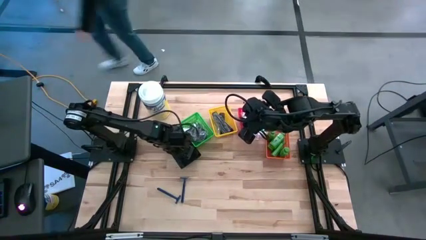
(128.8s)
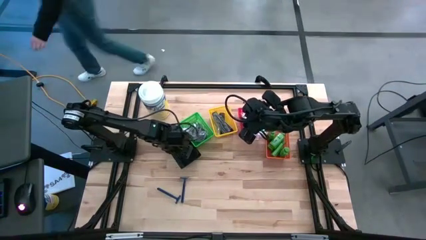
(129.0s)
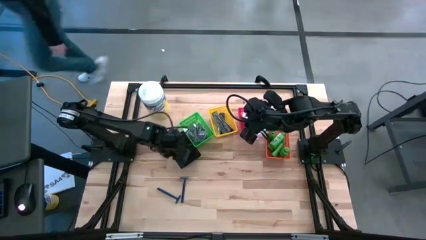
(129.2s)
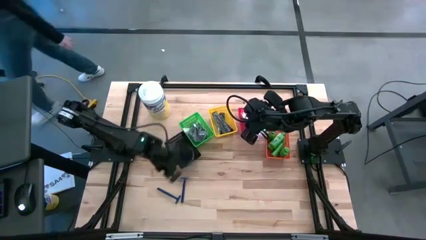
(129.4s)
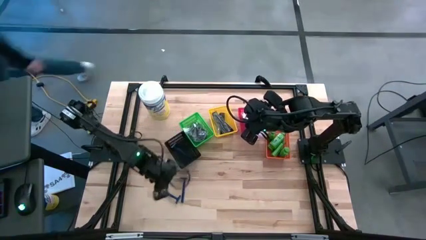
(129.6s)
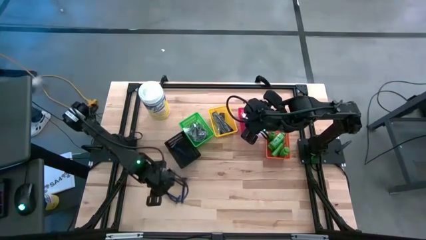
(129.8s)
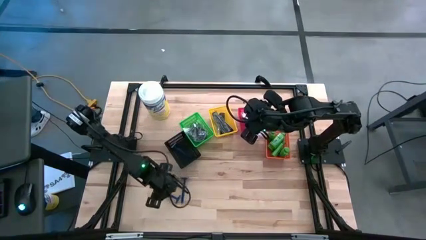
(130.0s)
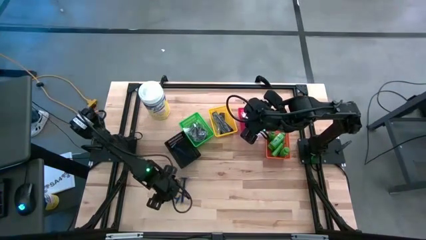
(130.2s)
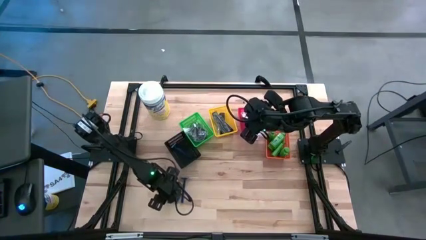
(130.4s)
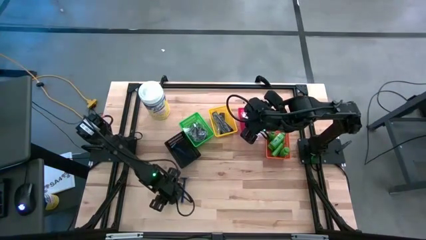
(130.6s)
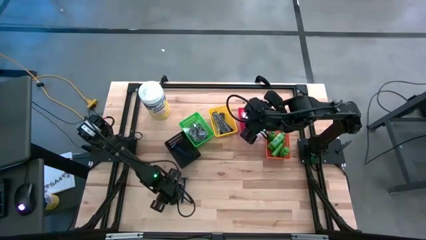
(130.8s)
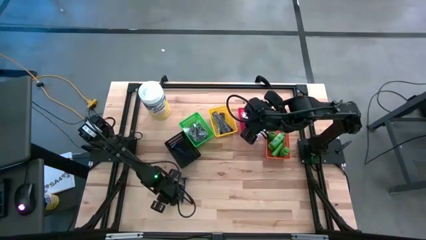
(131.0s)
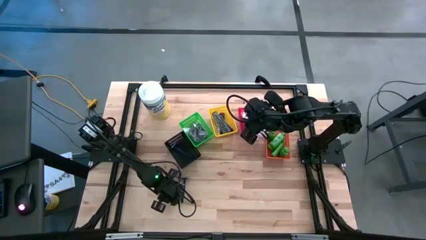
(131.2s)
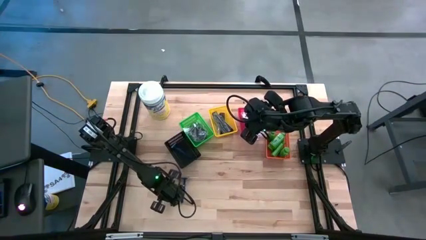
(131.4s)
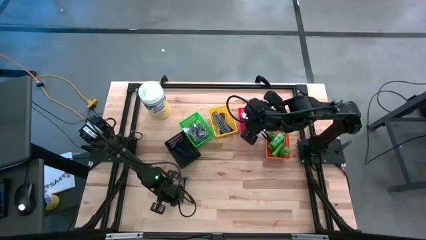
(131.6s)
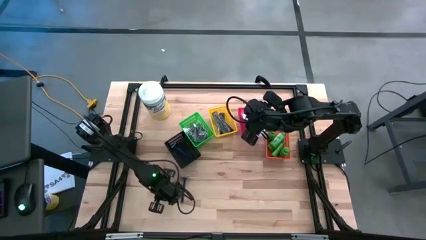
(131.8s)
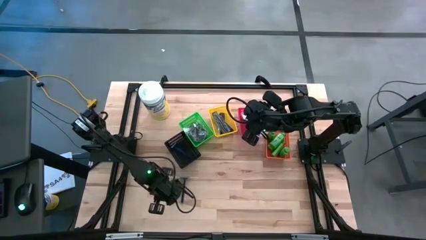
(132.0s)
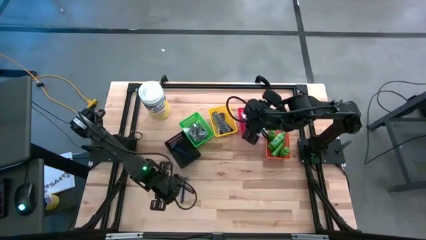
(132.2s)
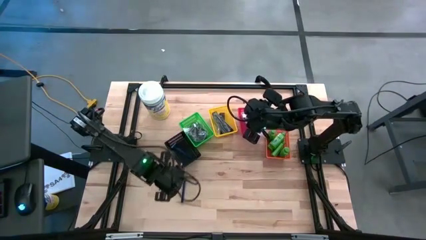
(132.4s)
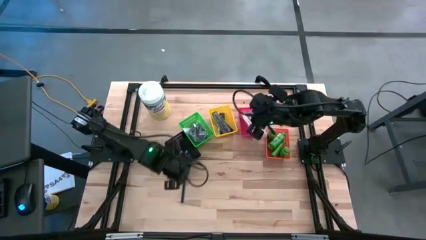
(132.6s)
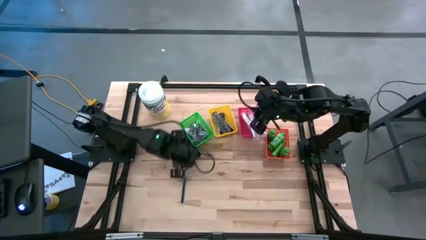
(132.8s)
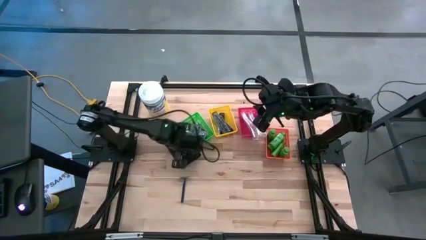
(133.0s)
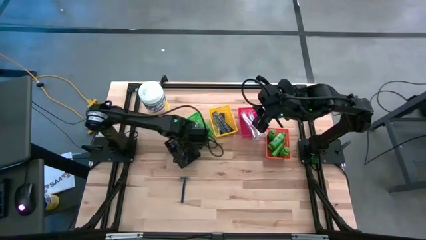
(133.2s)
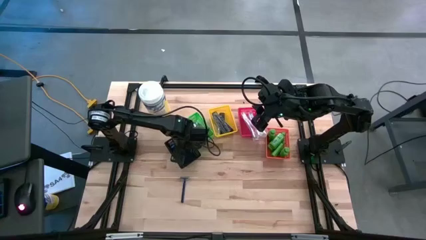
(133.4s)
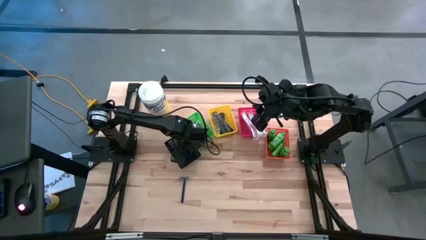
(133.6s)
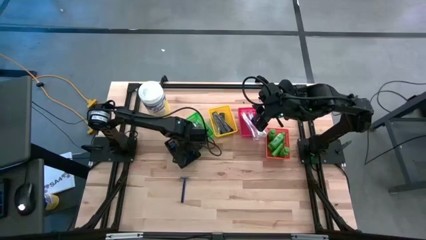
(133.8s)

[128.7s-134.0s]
Task: Pick & Place Travel size toiletries
Put the blue razor into the black bin

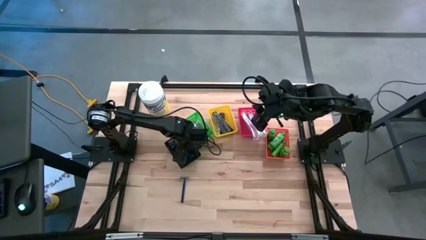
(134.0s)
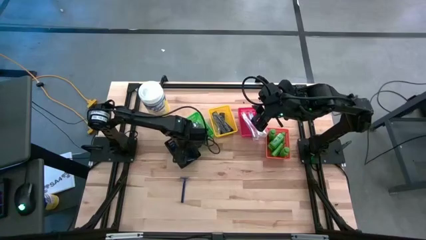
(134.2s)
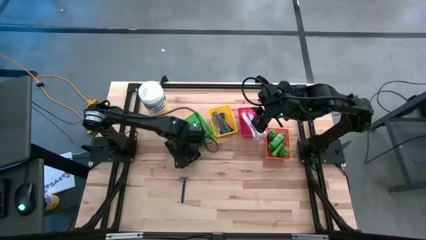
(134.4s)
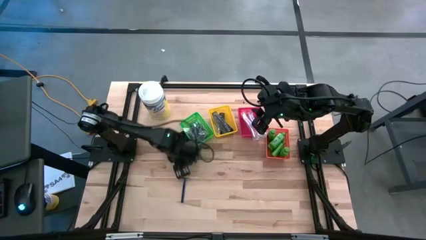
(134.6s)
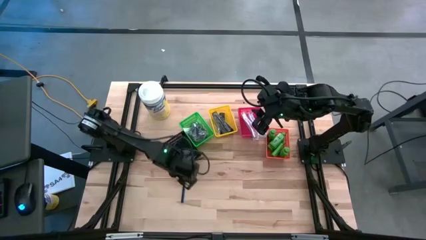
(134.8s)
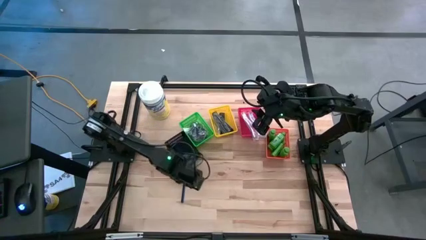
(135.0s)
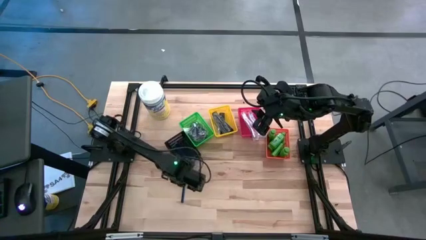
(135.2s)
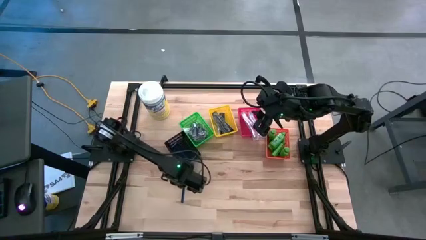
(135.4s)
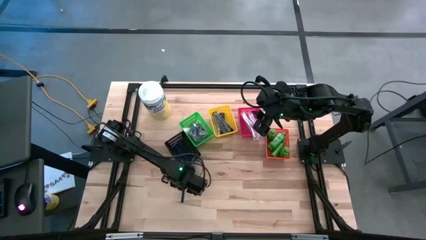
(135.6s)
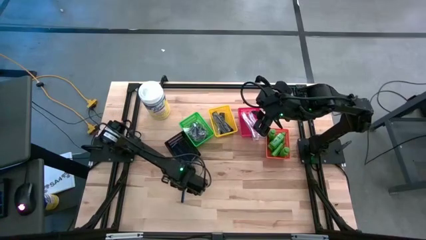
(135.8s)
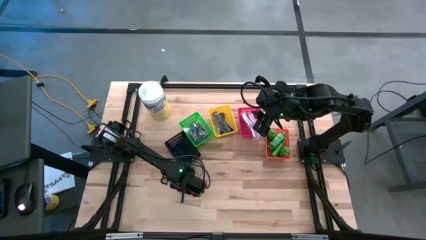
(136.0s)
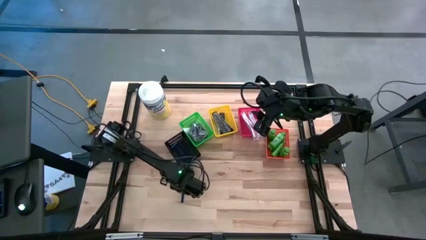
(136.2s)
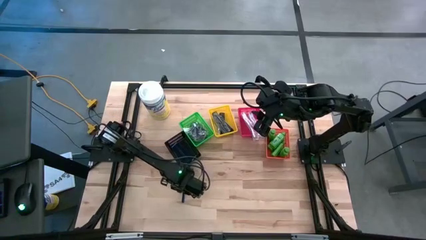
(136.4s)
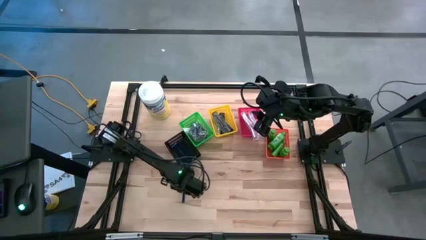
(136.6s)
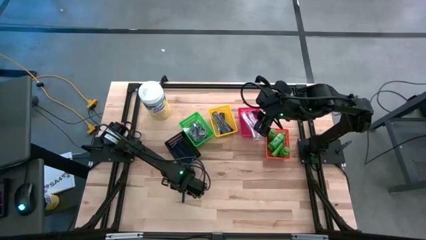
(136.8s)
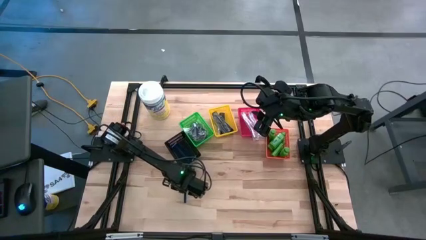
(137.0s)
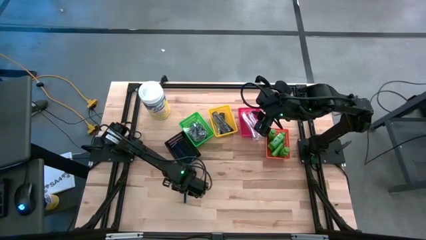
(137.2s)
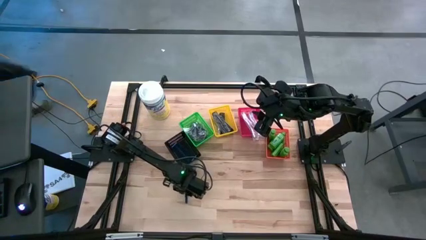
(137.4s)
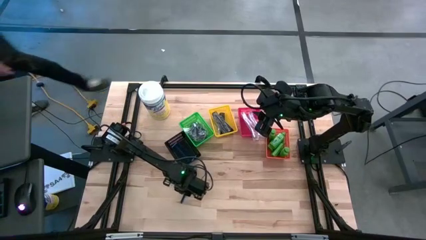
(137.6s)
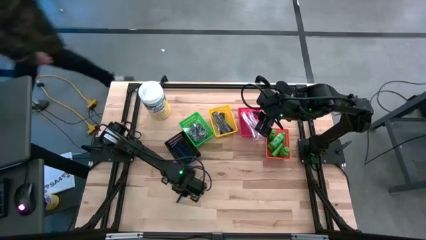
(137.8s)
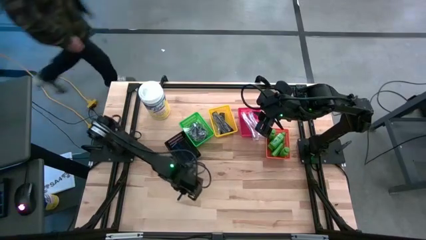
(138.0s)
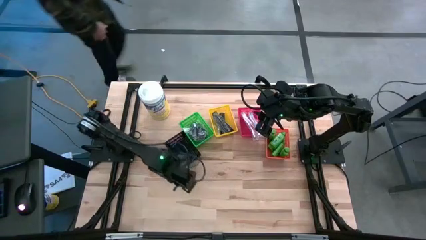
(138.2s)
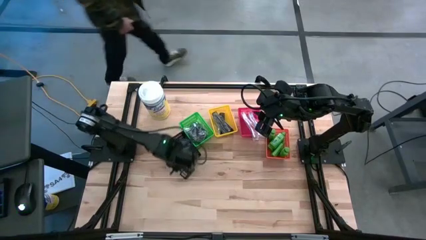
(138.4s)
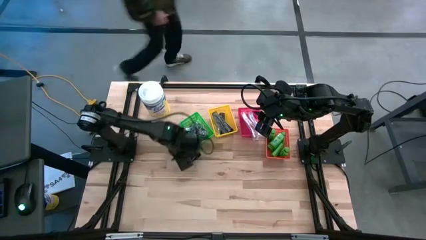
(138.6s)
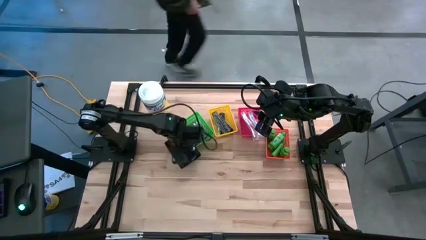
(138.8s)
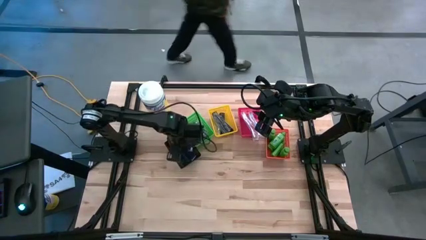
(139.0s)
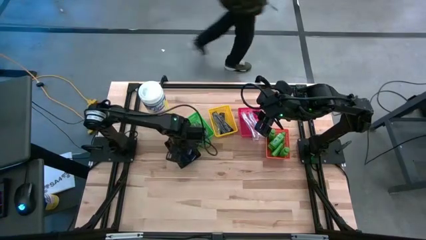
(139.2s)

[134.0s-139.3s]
Put the blue razor into the black bin

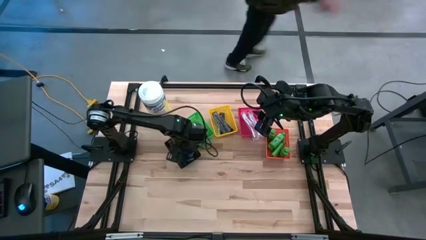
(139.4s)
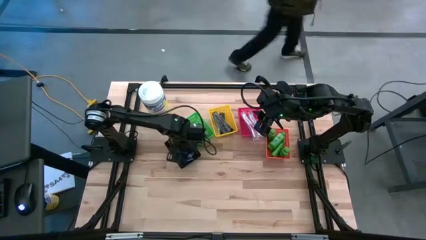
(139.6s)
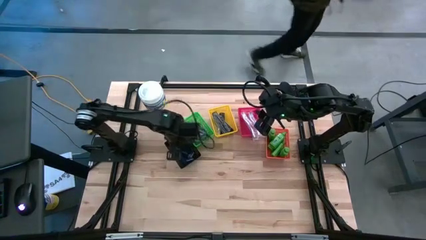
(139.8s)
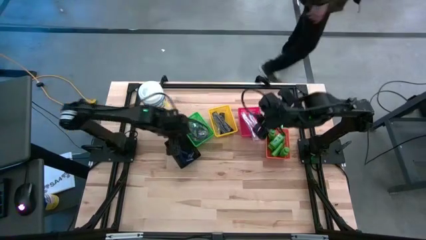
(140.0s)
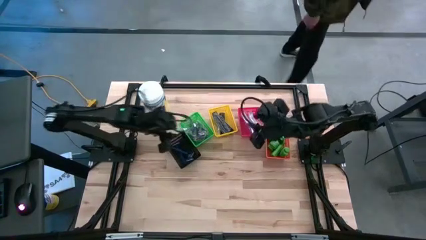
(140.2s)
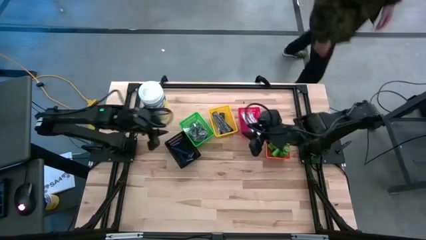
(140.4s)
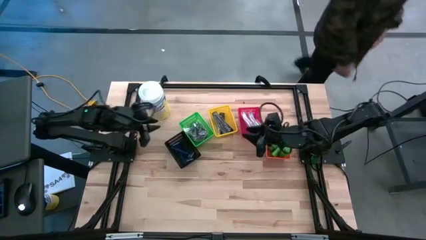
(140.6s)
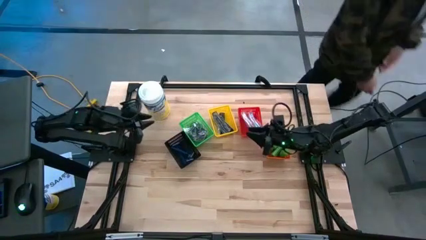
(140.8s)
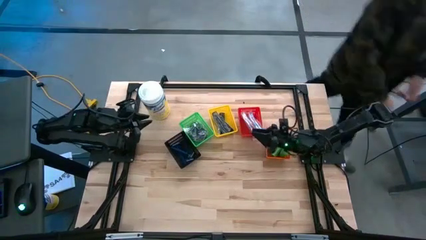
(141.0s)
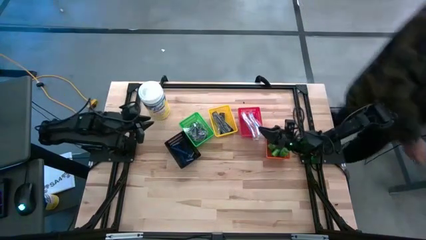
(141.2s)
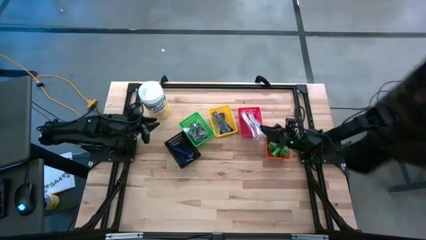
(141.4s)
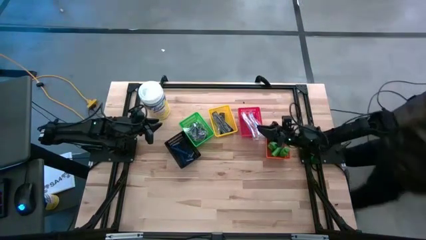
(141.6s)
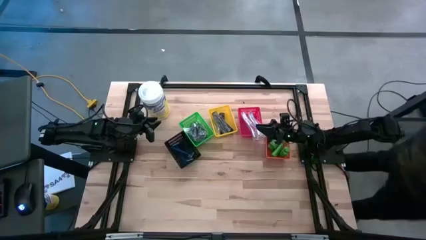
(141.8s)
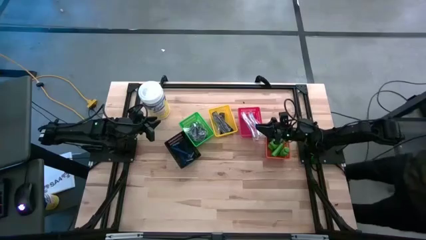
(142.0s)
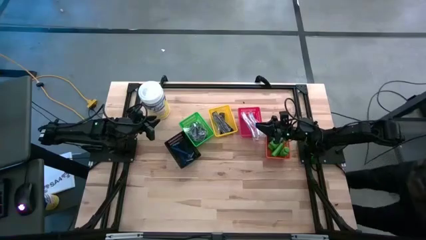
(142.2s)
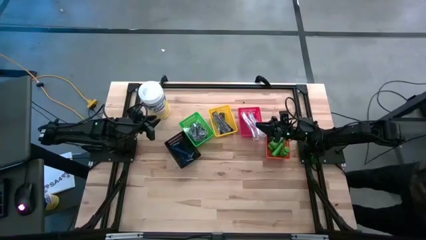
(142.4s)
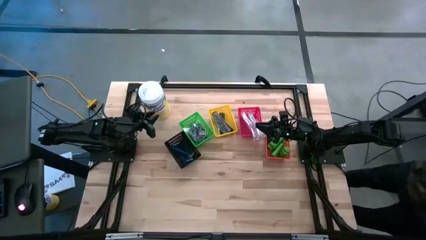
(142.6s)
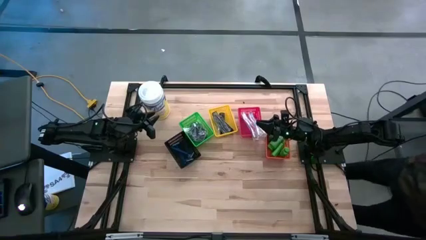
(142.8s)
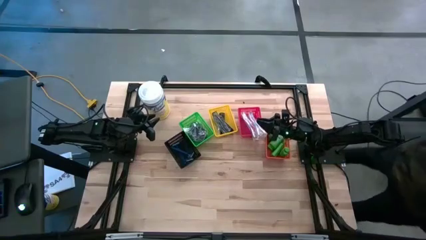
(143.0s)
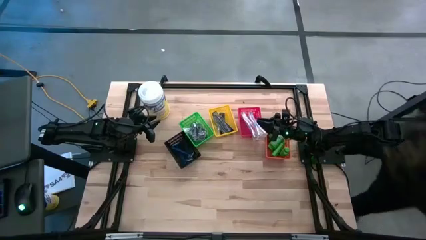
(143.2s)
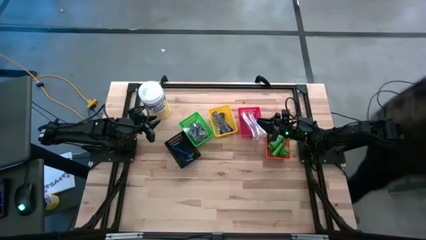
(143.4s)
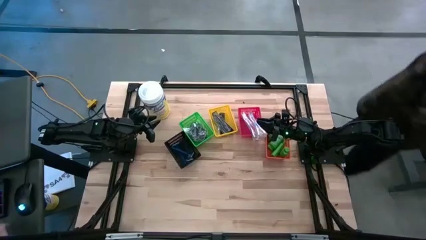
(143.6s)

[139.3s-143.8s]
Return to Home Position

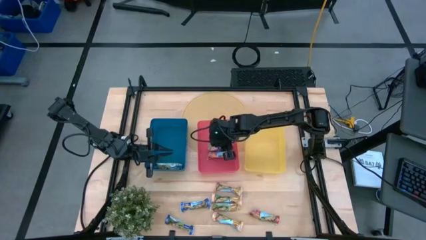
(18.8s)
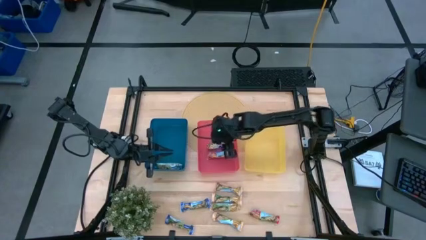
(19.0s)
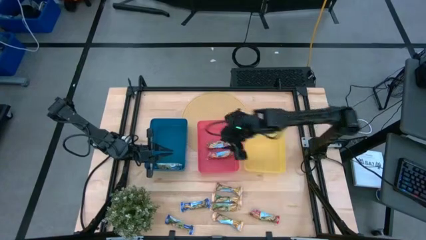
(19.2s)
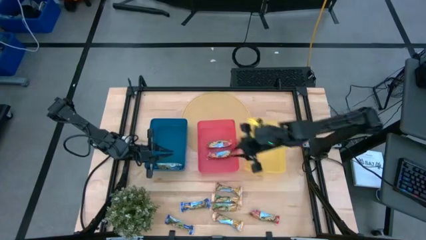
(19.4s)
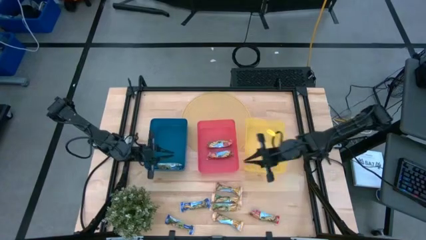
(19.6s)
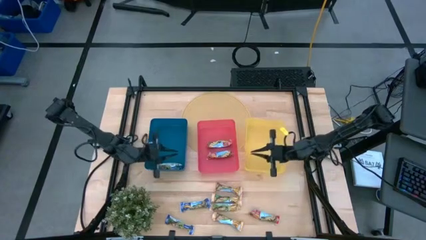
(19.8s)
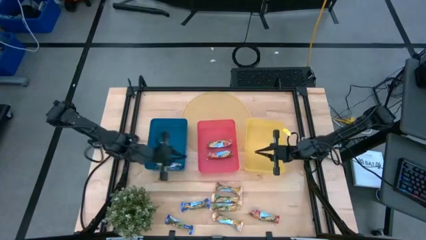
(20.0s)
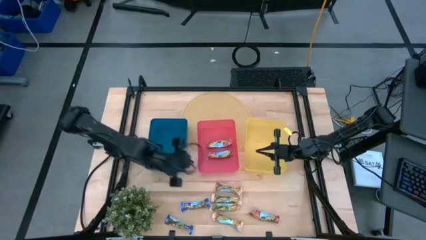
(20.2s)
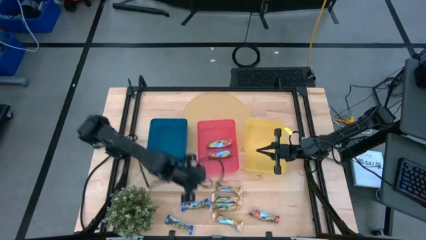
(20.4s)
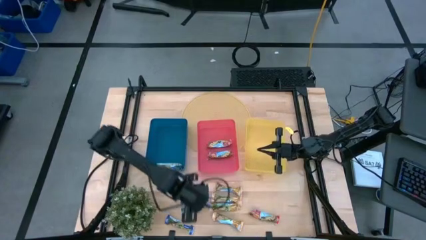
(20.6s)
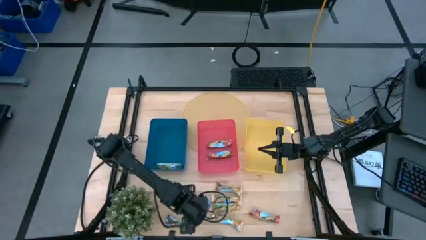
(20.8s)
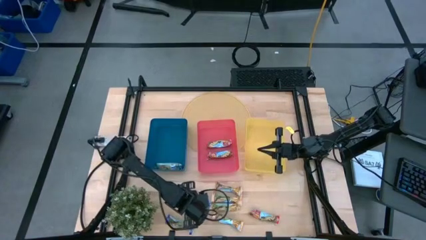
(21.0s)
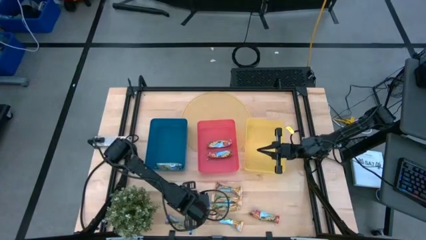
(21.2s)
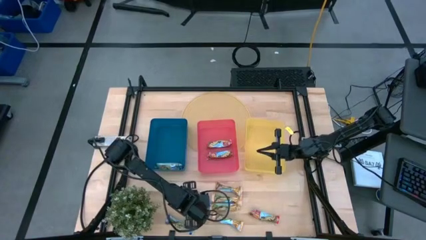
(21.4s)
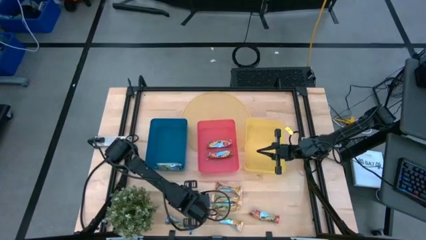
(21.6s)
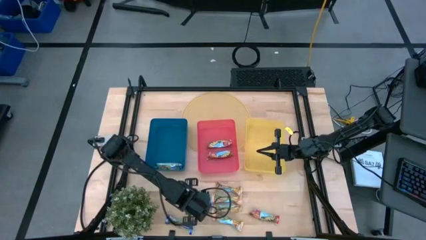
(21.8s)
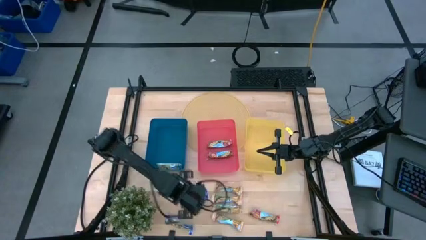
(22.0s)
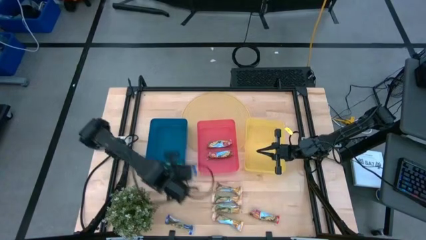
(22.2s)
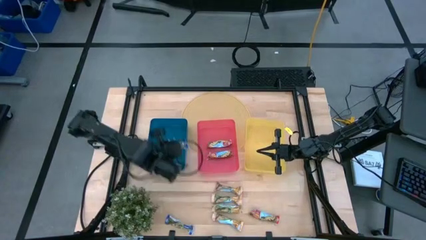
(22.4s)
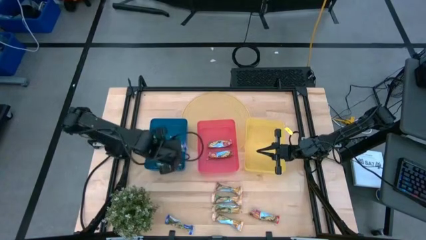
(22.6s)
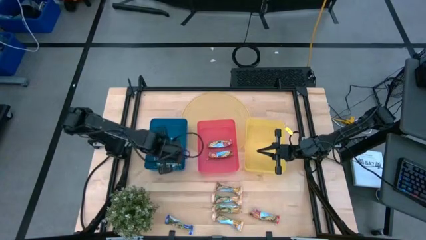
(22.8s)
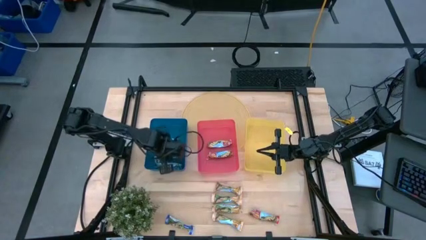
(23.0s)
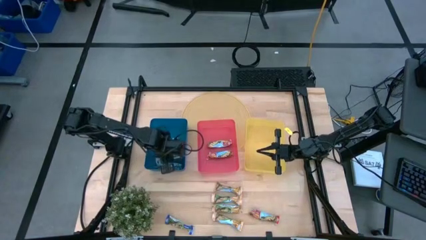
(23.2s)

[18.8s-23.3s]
Task: Pick and place Granola Bars by type
Put the blue granola bar into the blue bin
